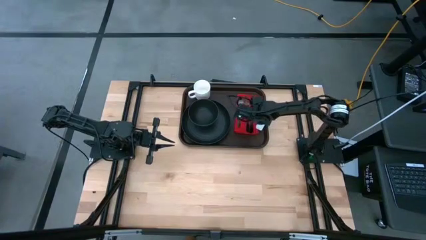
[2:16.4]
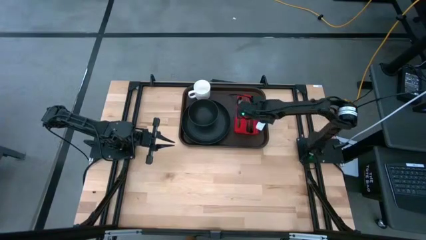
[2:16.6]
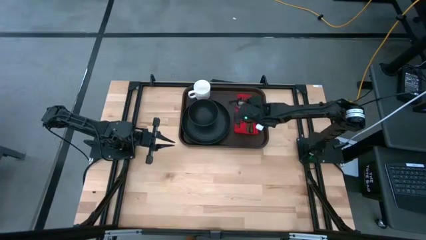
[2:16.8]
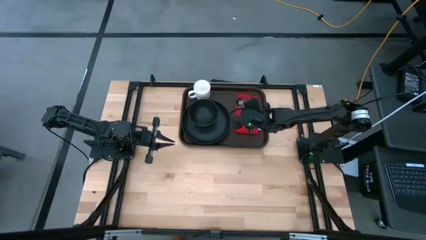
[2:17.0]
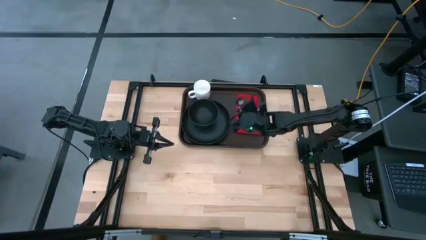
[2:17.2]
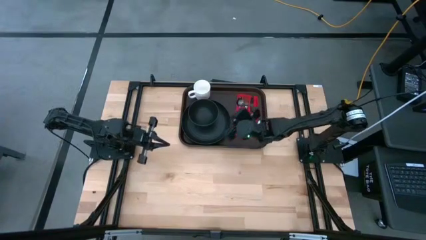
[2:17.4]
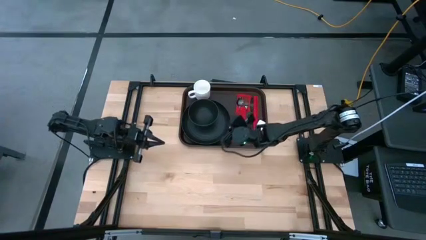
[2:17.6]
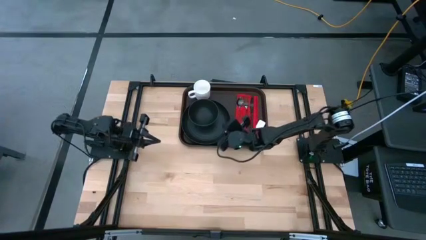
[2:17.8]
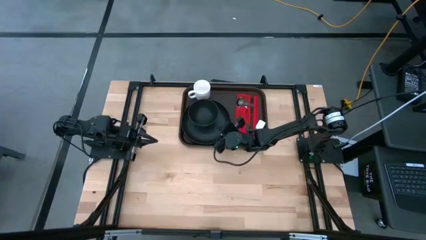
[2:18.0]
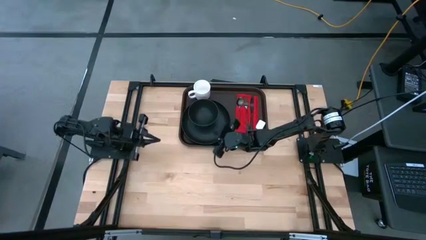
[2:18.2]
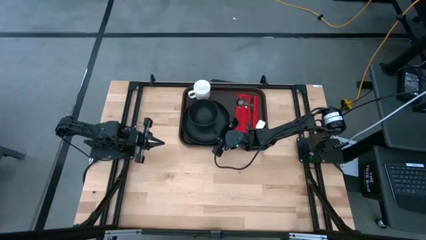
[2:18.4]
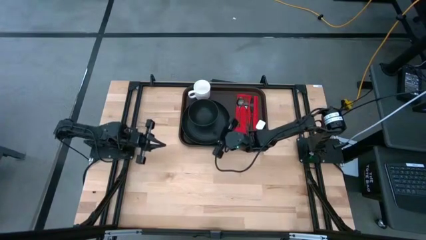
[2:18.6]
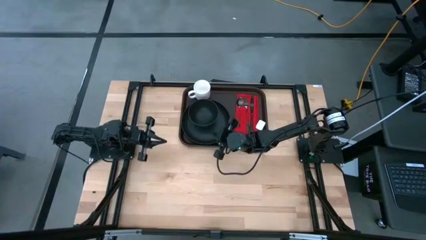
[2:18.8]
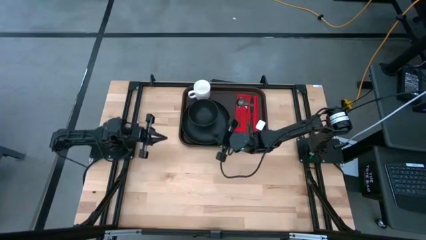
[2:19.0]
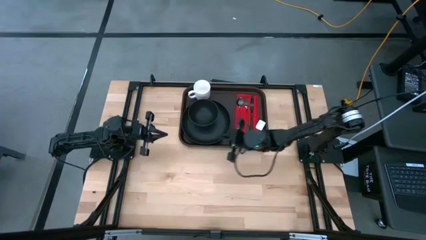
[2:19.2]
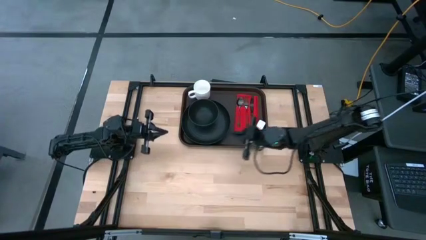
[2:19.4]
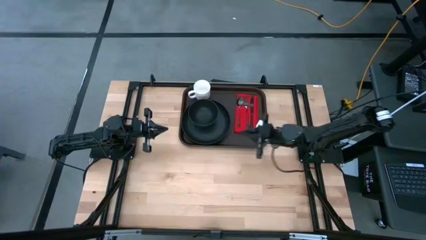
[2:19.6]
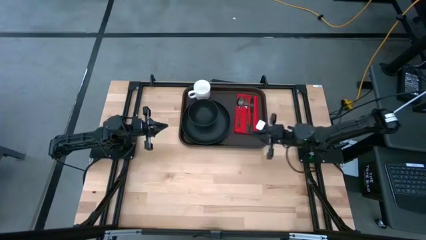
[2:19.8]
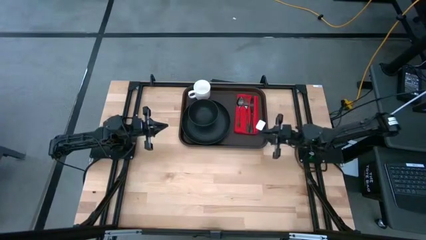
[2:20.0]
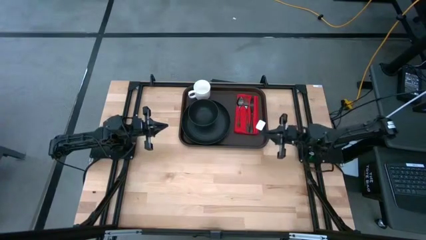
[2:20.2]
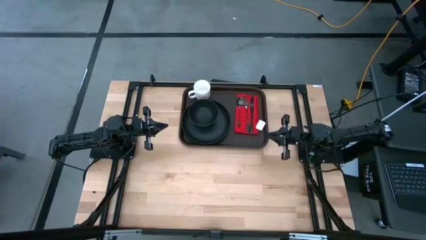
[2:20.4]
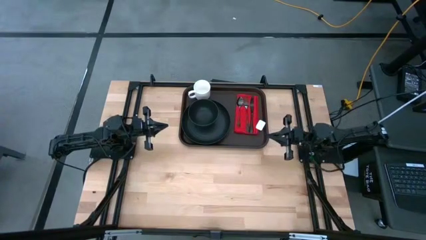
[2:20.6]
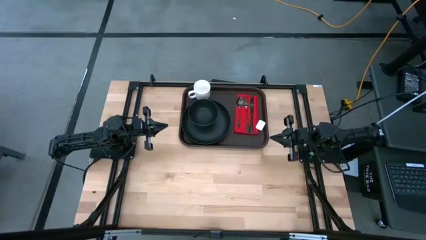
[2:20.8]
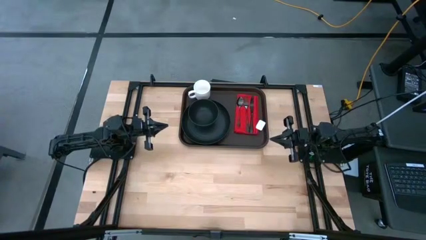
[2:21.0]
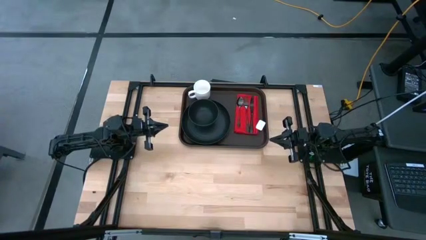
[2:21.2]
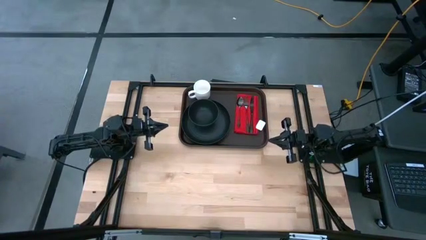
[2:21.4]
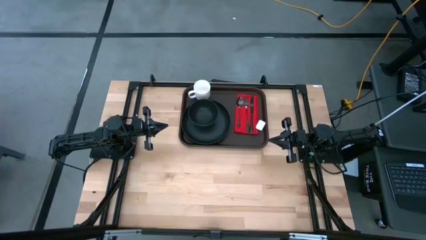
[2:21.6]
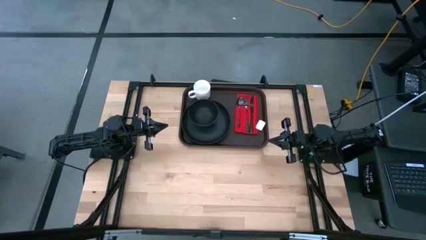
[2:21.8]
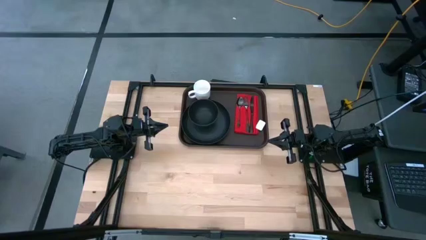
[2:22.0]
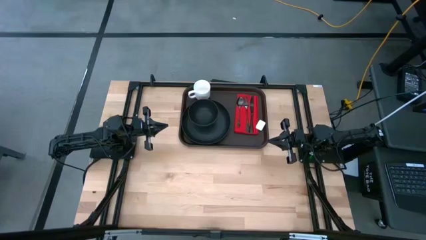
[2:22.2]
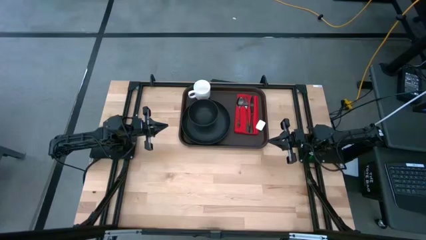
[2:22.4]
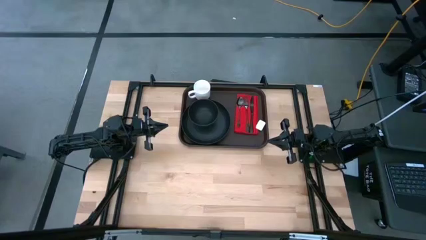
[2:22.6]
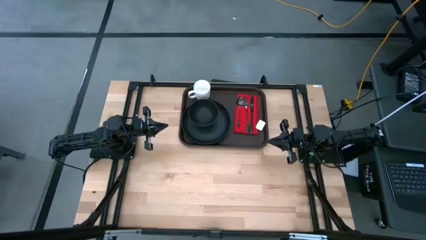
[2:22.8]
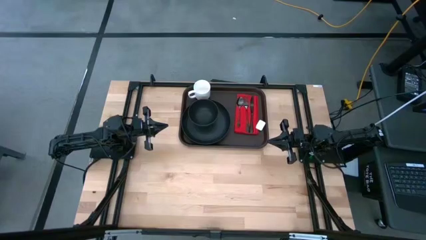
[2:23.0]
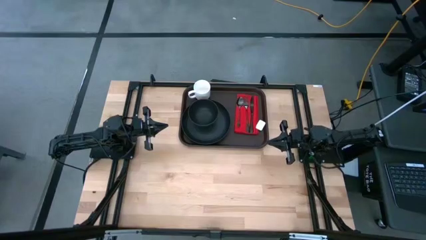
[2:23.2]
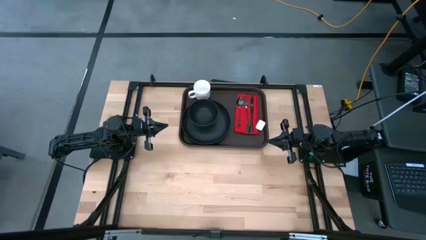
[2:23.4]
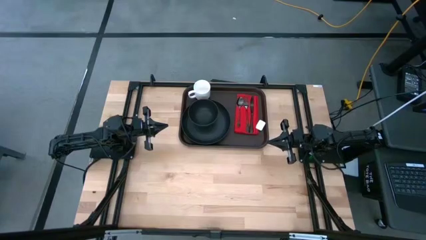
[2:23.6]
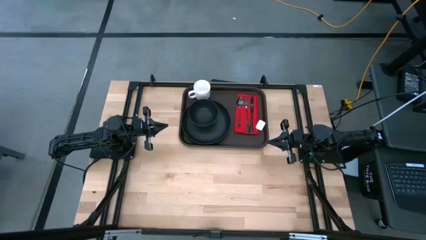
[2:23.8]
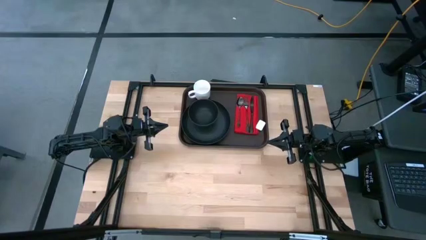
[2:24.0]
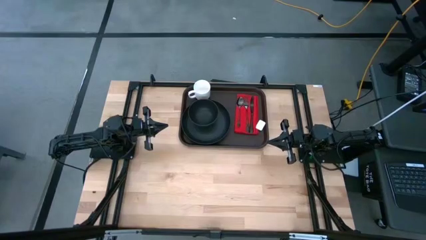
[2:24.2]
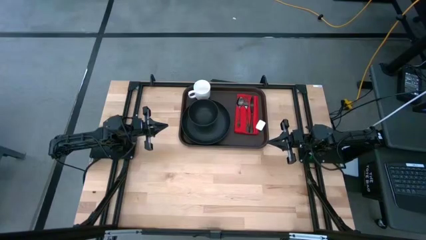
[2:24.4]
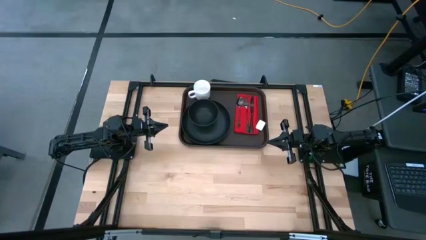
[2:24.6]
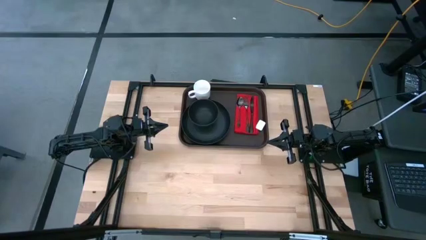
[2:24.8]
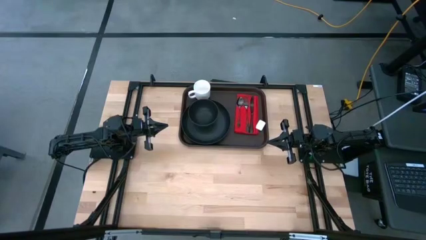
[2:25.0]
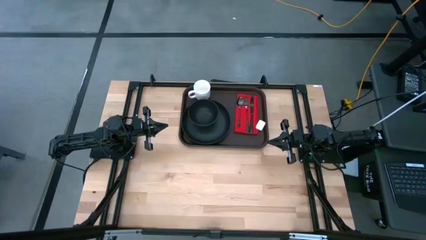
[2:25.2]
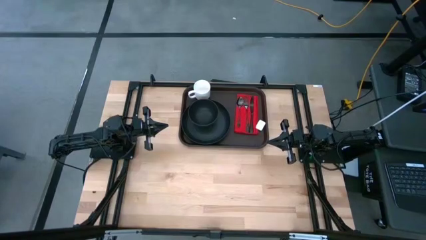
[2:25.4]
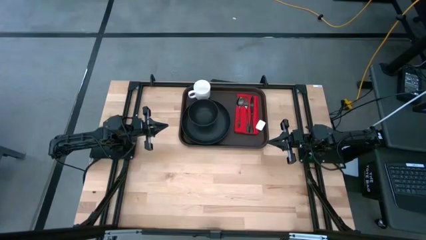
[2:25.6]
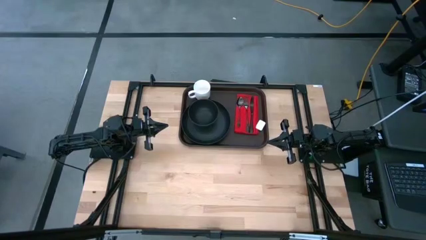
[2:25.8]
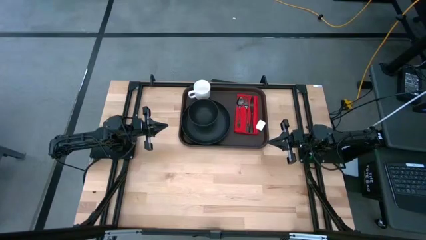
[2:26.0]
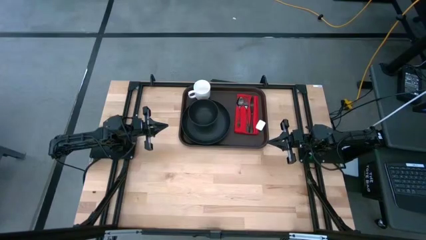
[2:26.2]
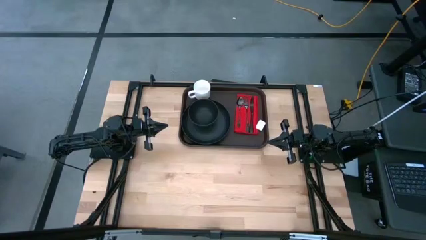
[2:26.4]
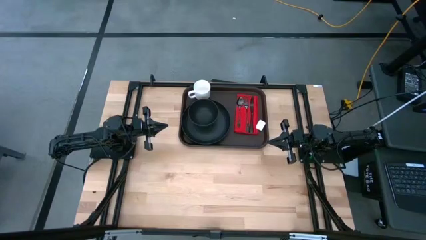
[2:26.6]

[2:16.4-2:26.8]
Task: Set up tray
Return to Home Position
